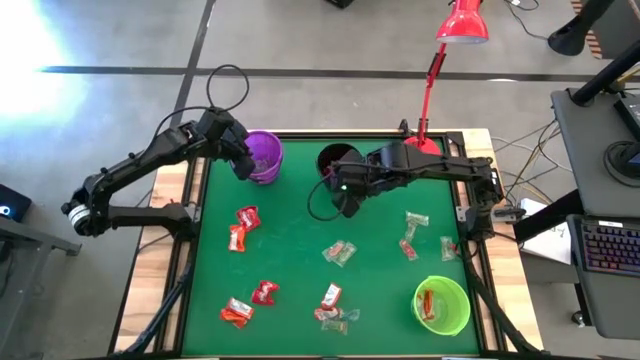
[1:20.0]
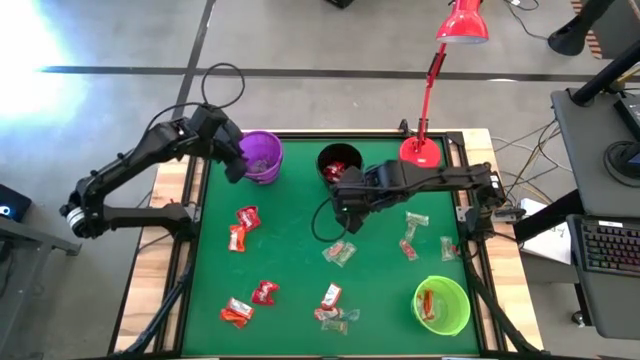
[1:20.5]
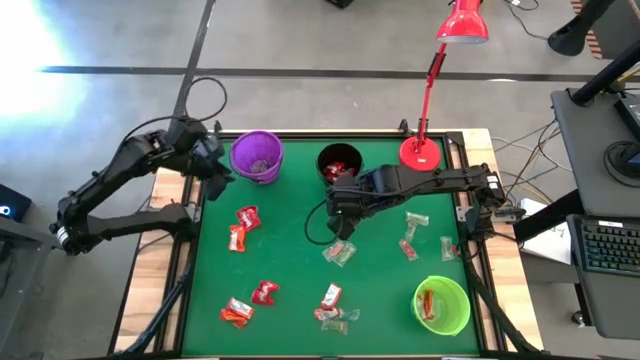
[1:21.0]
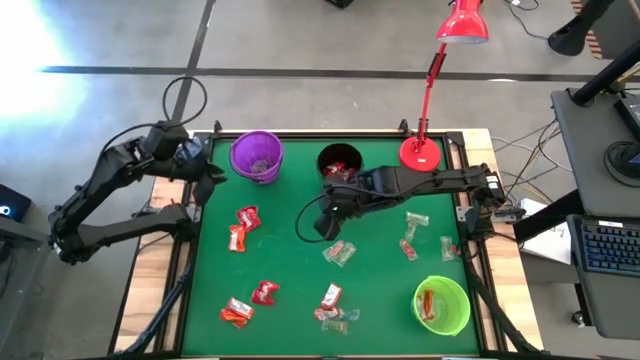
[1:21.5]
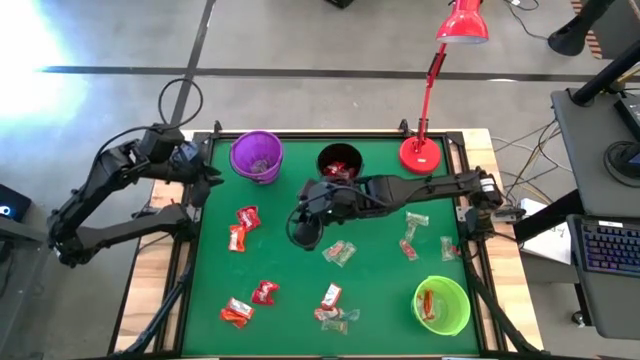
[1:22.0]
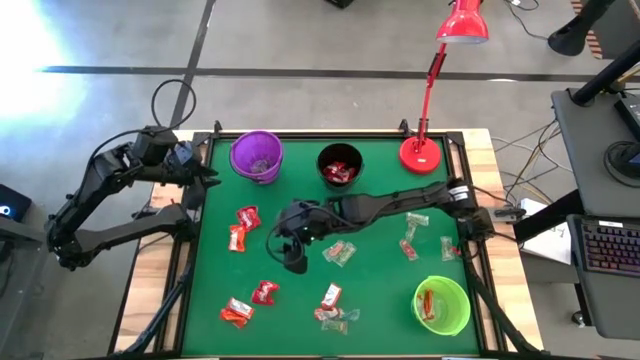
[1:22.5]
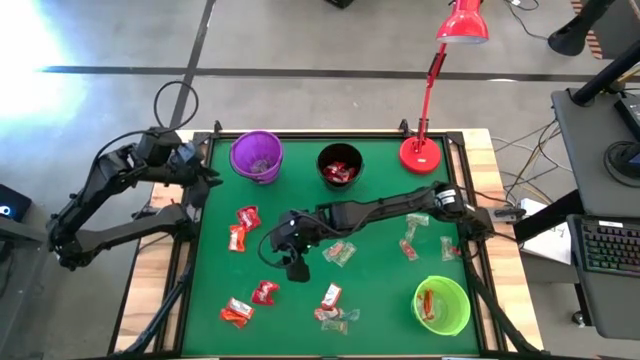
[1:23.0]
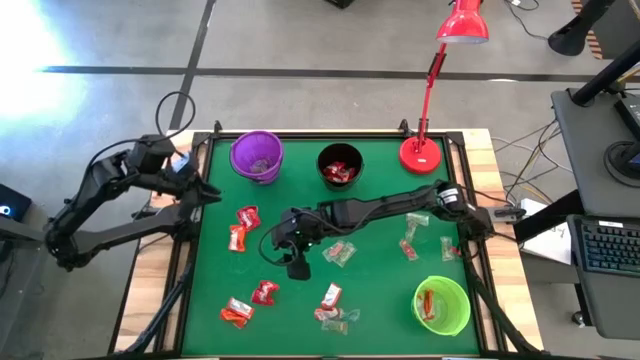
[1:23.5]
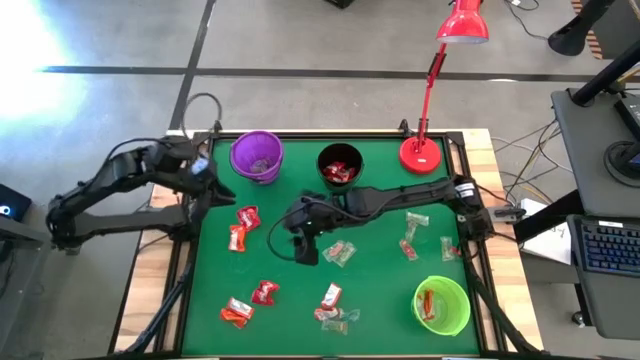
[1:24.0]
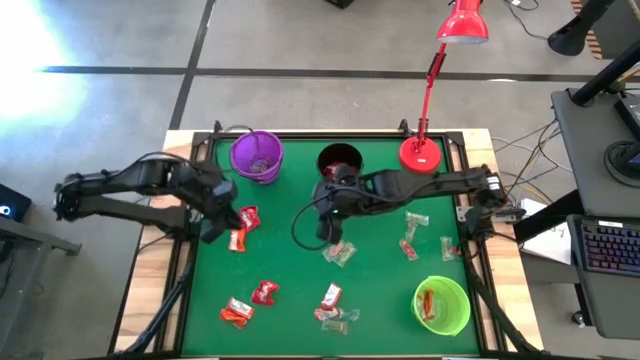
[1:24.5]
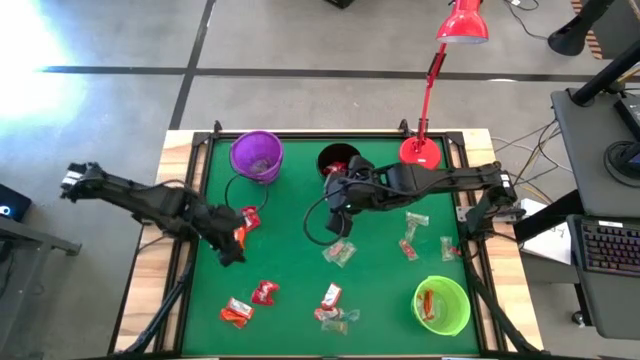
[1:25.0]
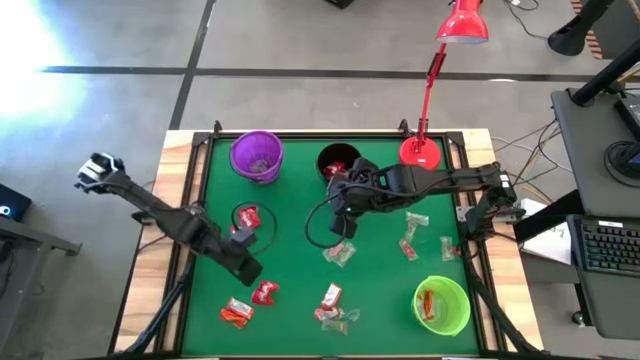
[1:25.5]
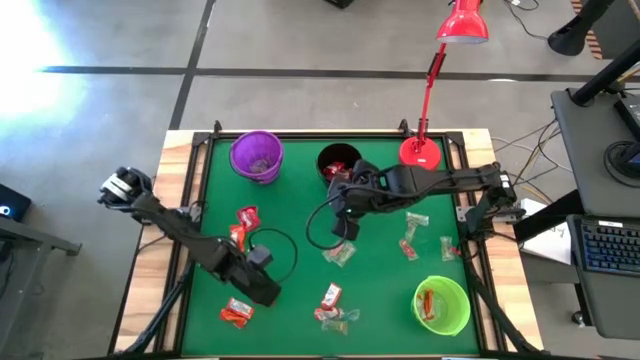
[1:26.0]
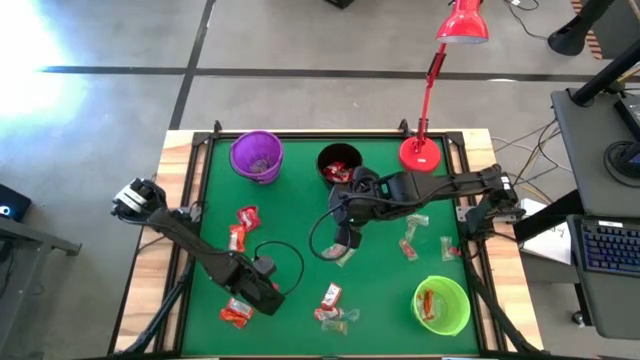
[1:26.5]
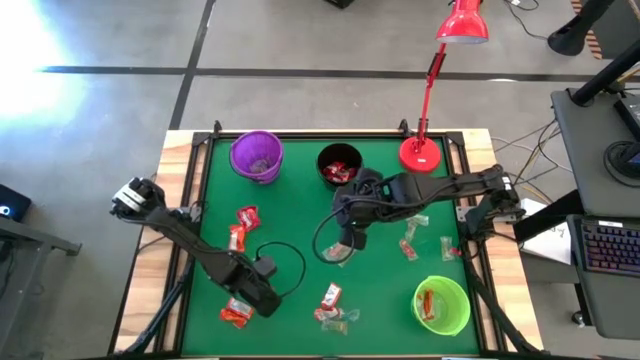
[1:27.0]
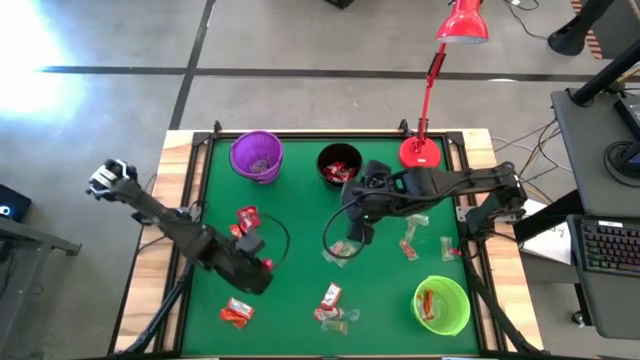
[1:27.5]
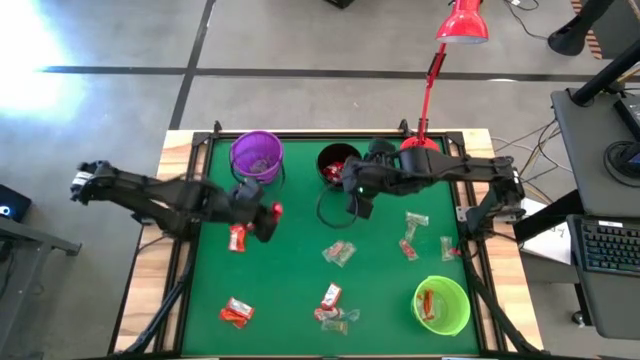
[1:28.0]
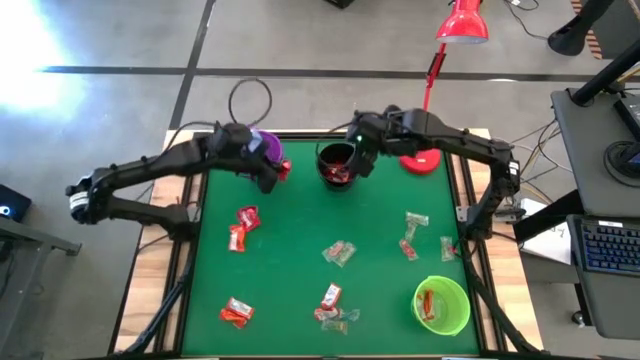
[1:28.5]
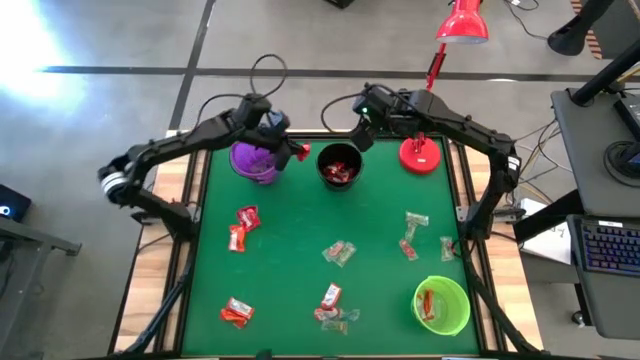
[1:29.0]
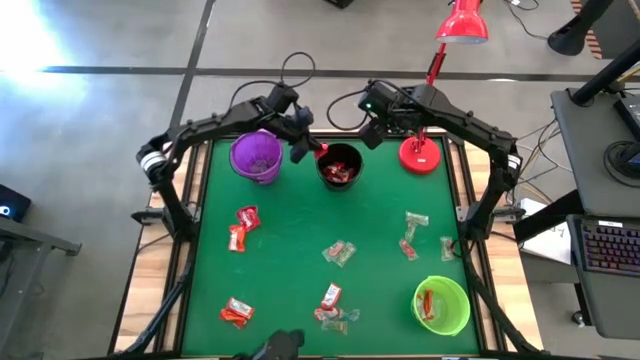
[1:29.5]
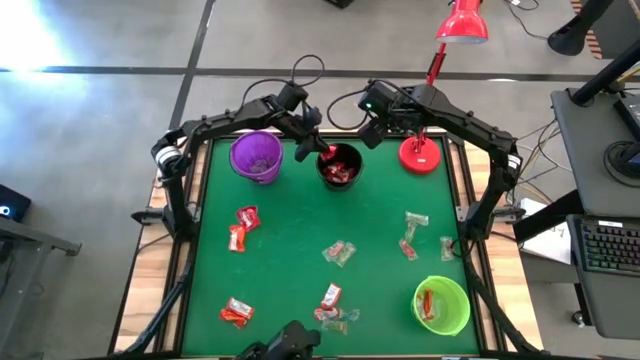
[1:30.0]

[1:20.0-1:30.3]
Task: Sort candy
Put the red candy pack into the black bucket

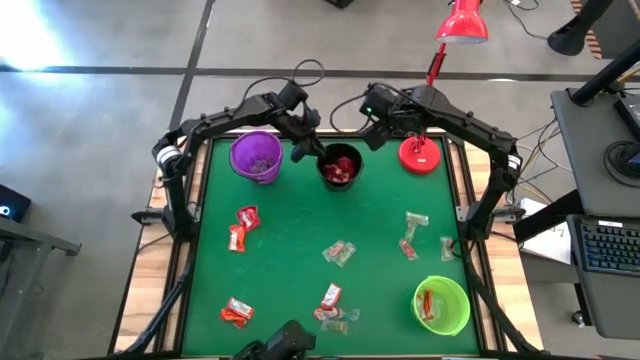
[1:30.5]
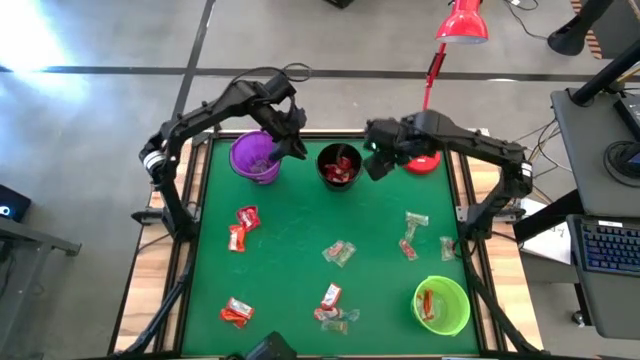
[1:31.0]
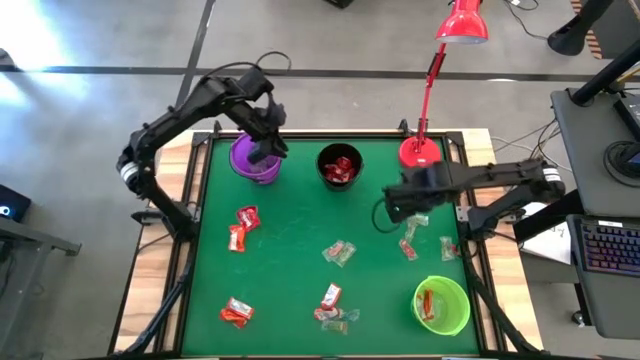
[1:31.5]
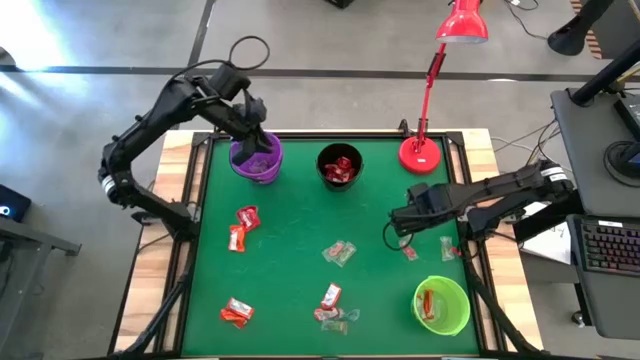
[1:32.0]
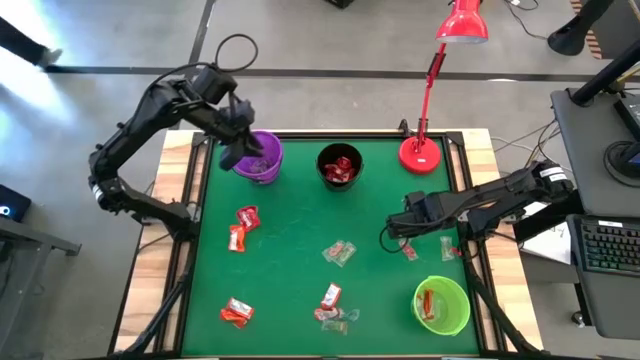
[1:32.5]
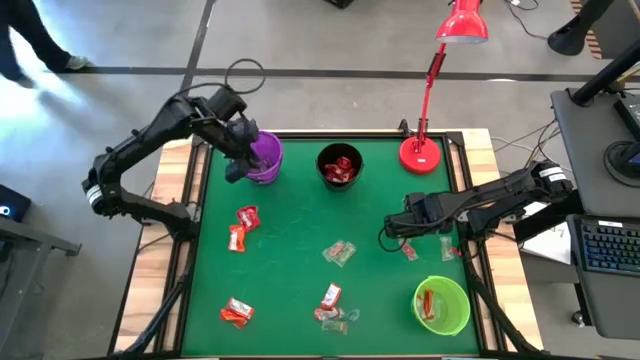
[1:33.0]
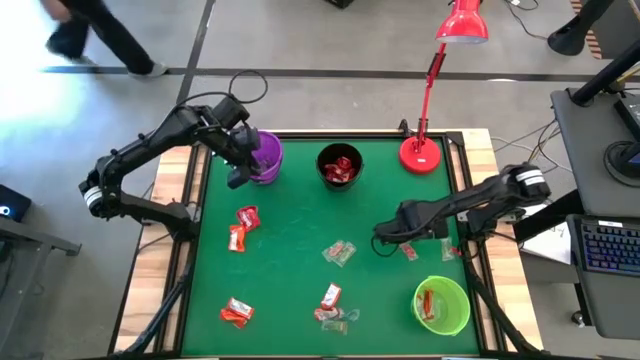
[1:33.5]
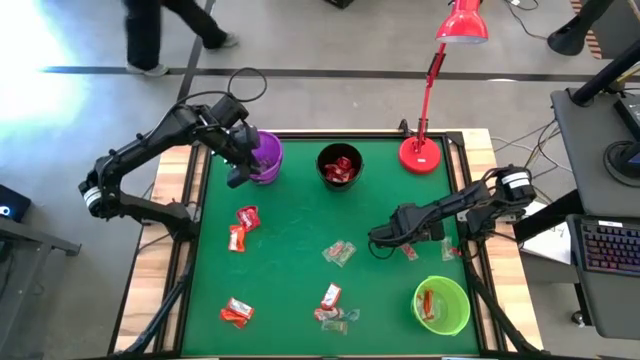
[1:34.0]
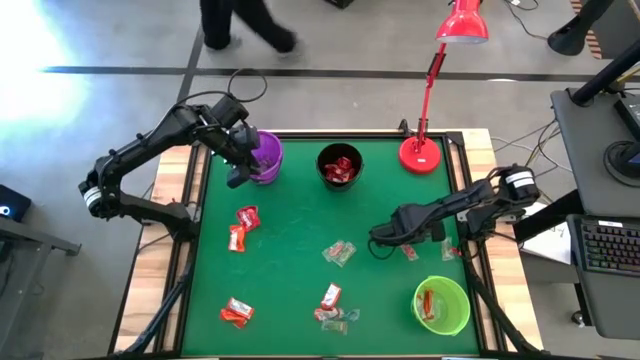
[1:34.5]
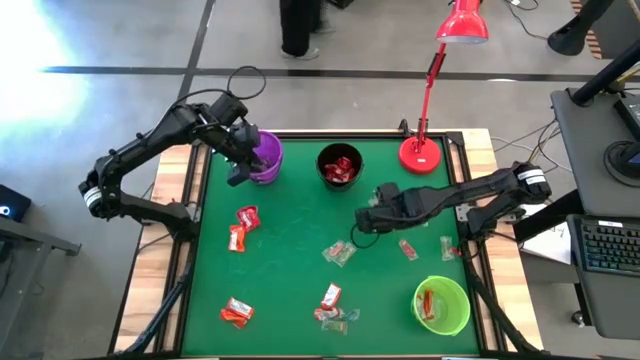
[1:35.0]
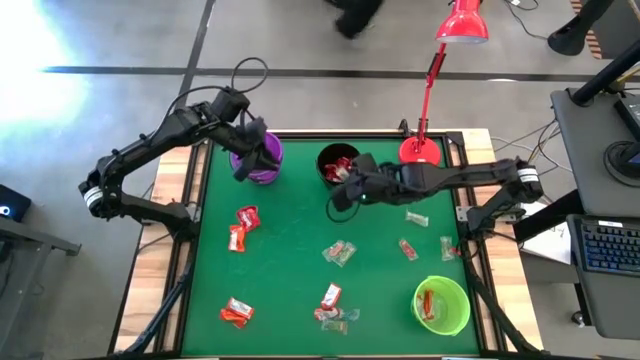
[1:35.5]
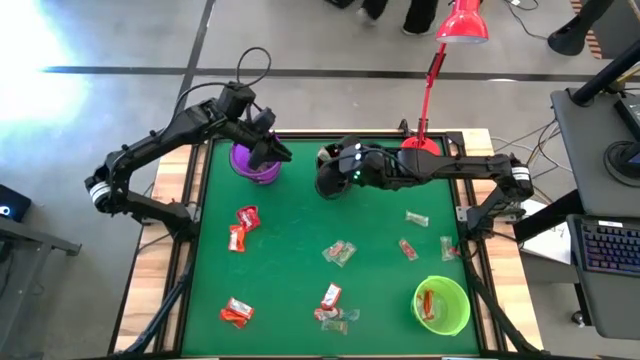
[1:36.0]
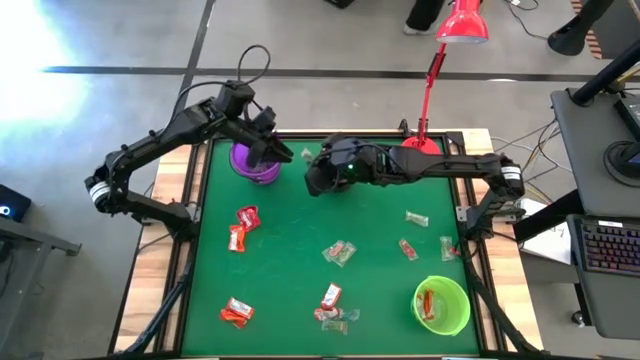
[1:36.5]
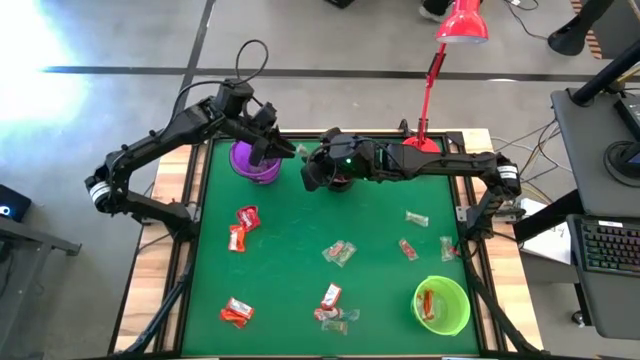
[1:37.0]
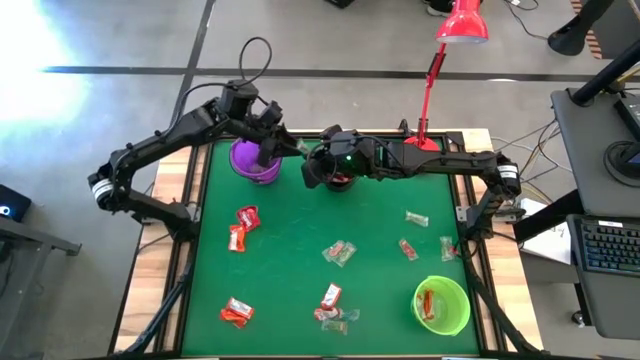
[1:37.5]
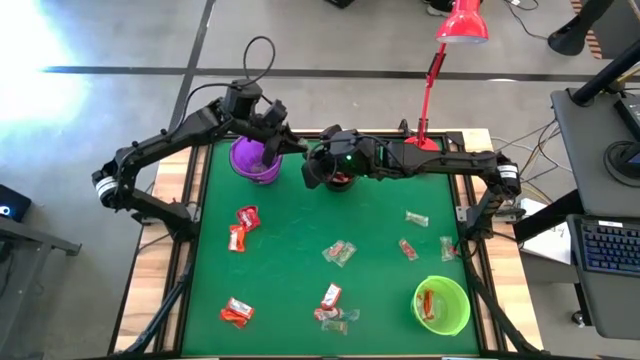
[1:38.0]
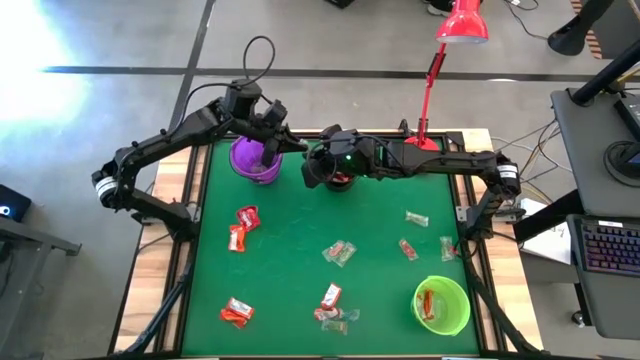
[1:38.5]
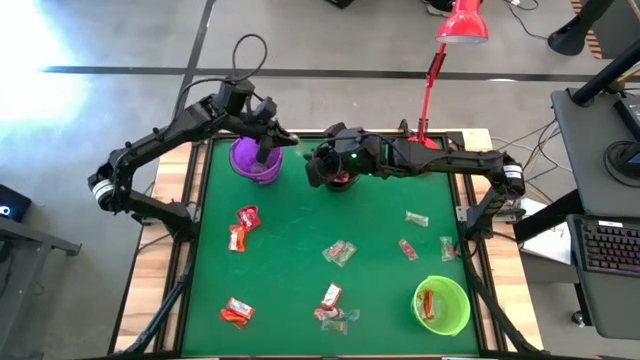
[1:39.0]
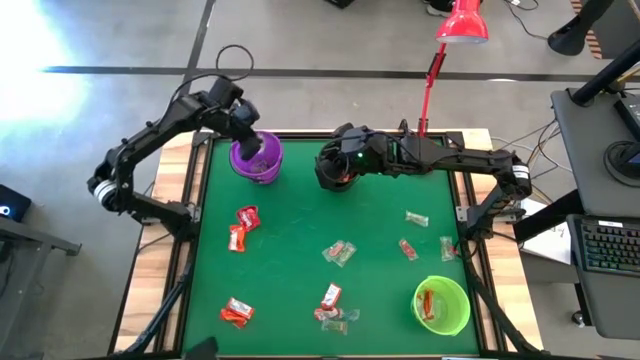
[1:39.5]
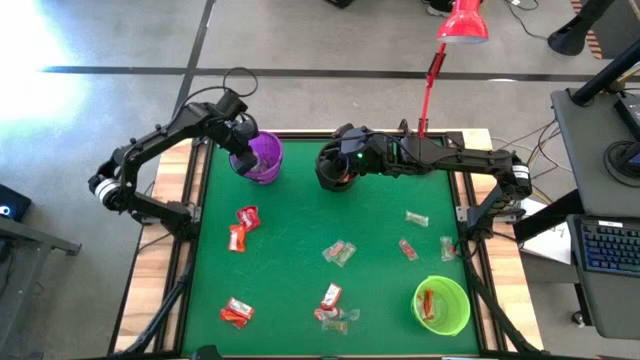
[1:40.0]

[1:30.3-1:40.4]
Put the green gummy into the violet bucket
